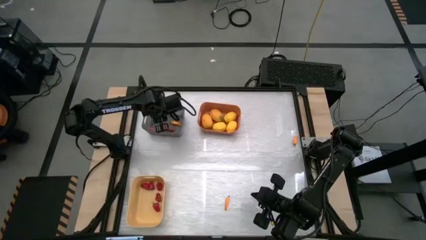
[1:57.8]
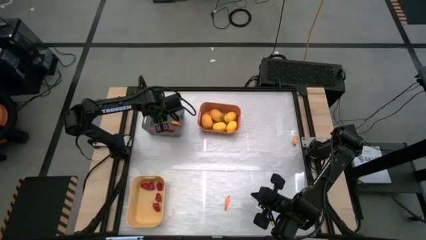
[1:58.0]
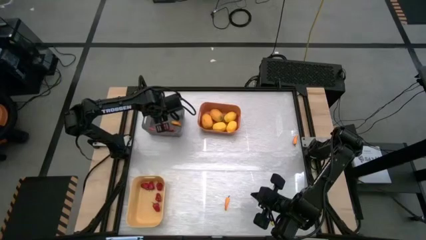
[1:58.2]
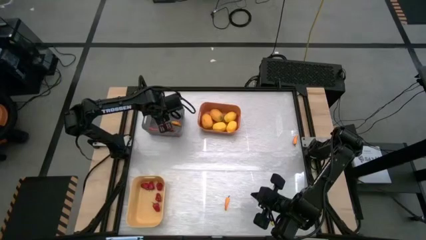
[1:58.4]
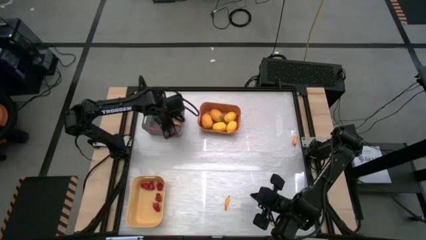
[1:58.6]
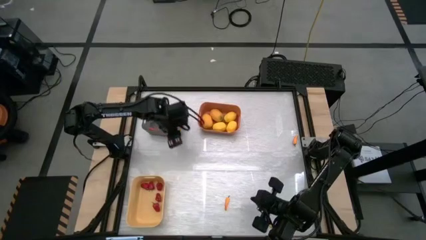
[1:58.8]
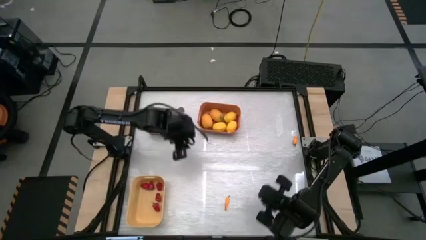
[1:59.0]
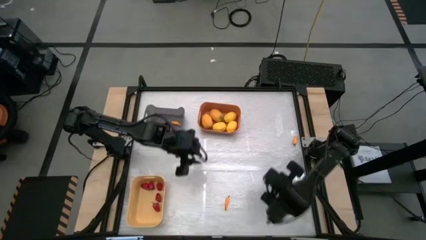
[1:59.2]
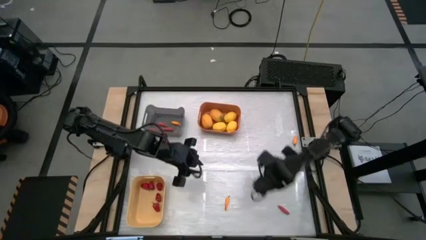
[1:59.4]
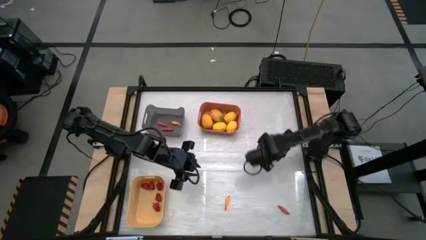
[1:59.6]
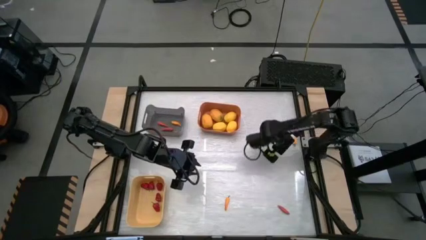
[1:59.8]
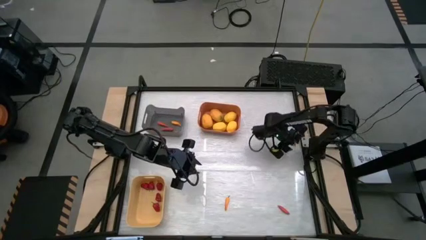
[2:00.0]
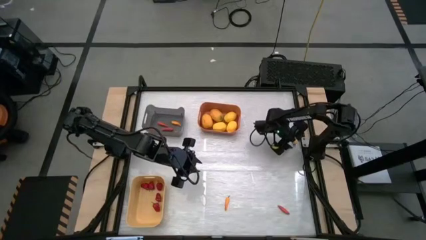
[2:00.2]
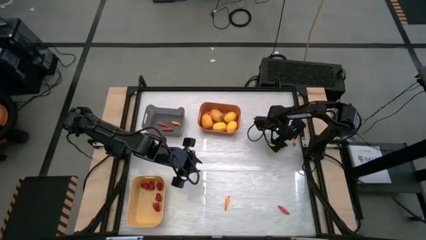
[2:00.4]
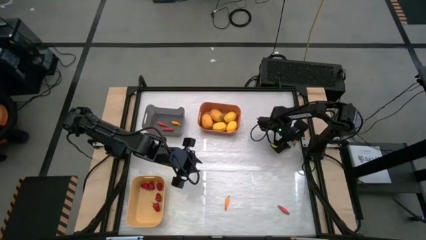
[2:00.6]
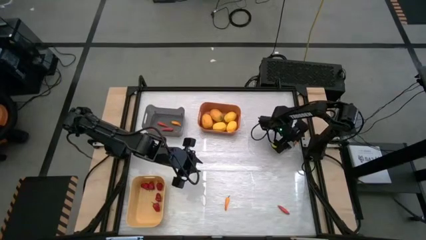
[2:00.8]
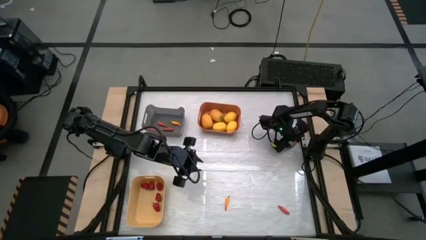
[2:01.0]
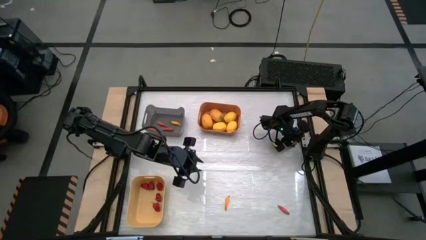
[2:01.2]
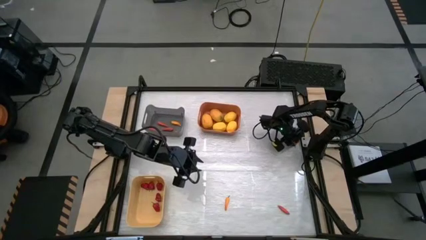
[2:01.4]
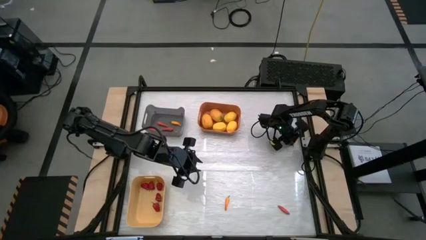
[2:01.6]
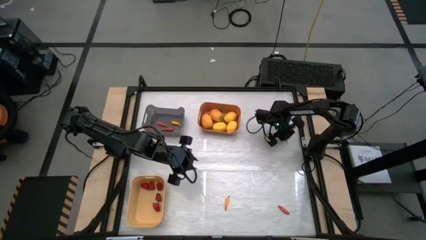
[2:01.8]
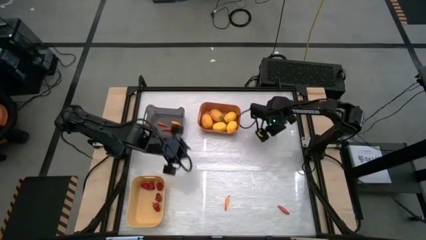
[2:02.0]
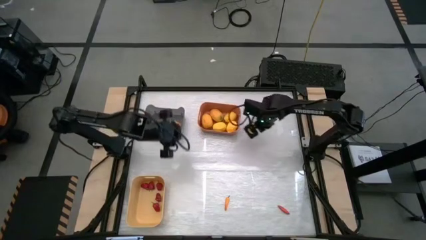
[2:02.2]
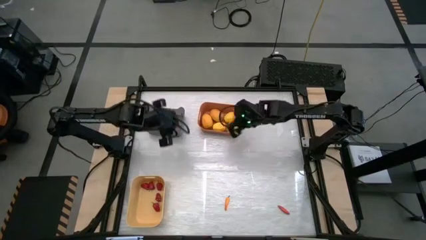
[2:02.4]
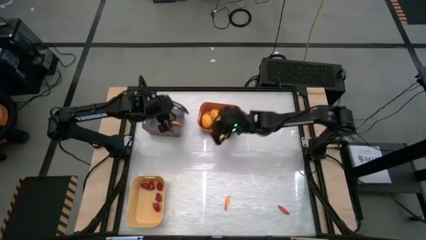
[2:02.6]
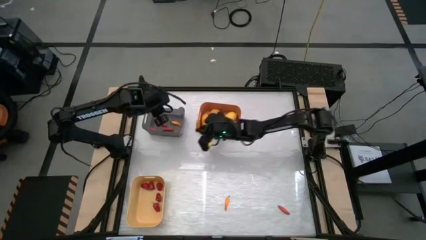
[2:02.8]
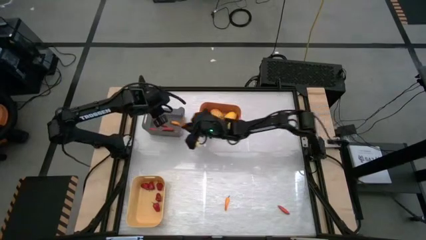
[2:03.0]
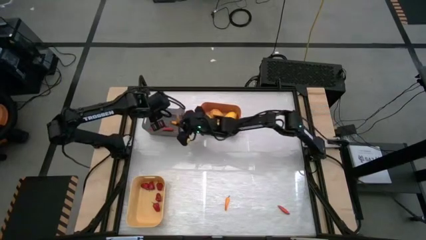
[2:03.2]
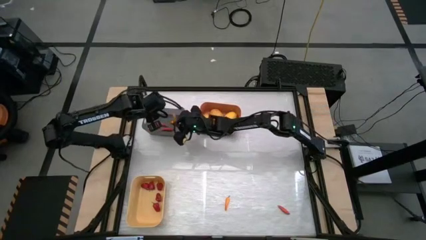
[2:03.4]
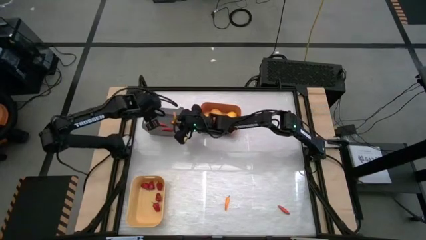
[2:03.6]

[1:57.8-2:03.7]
Task: Sort produce into baskets
Put the chili pepper into the black bin

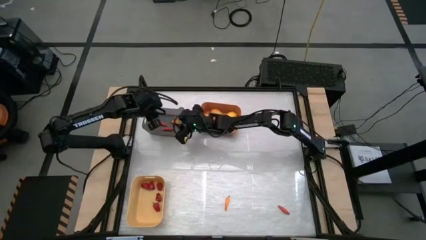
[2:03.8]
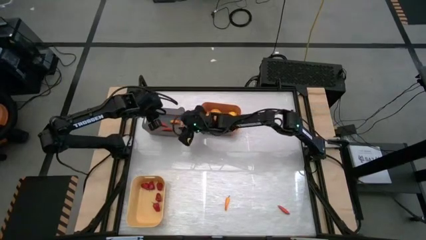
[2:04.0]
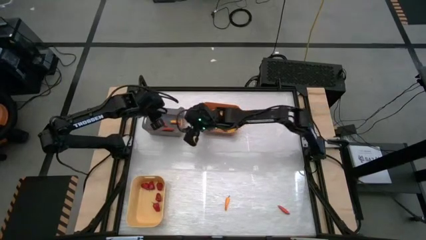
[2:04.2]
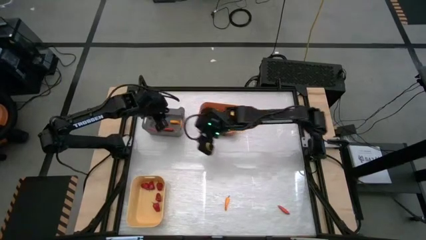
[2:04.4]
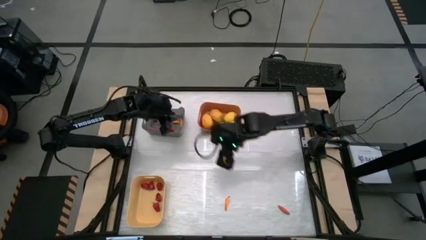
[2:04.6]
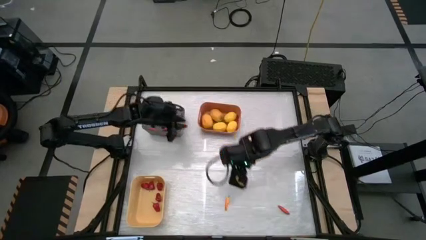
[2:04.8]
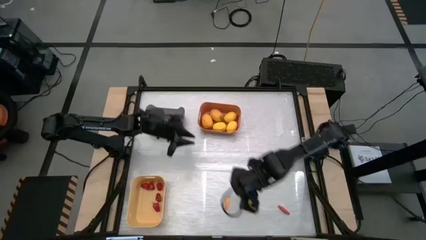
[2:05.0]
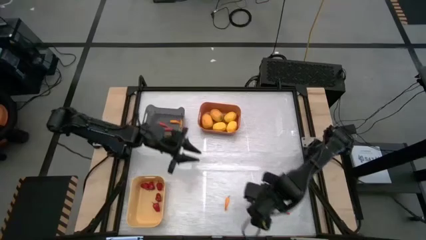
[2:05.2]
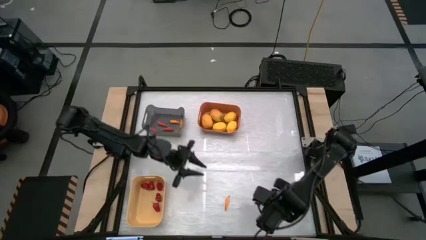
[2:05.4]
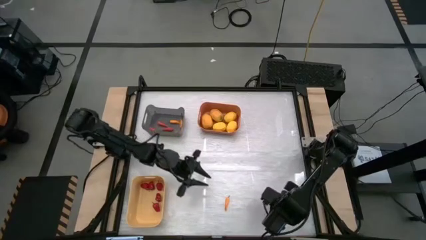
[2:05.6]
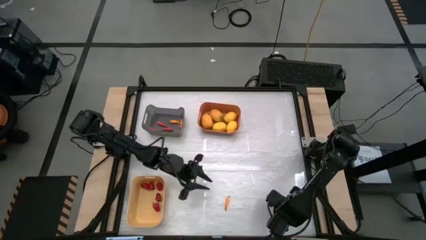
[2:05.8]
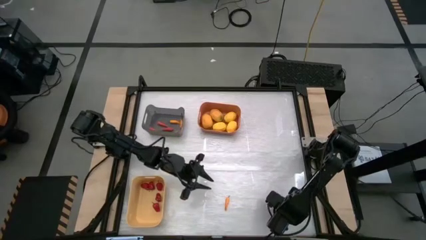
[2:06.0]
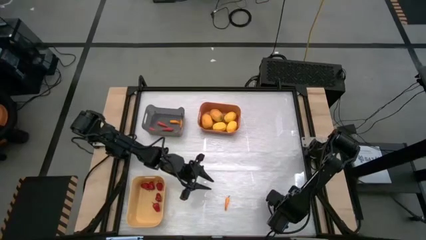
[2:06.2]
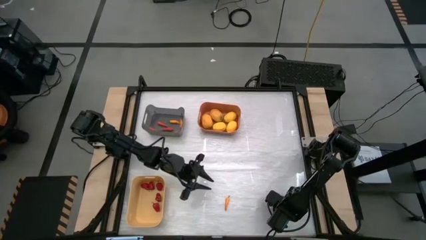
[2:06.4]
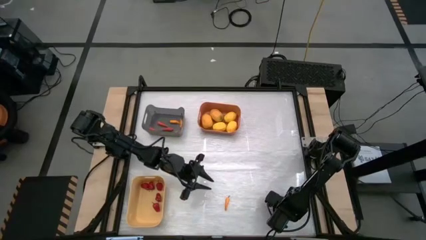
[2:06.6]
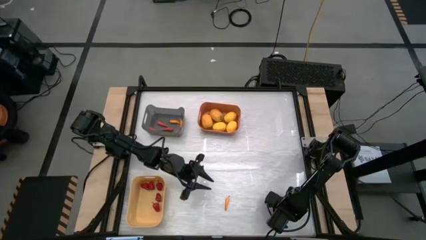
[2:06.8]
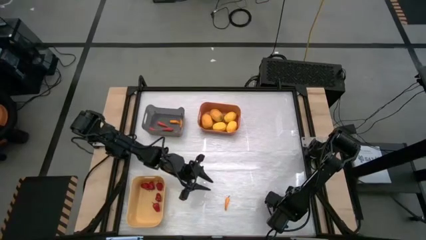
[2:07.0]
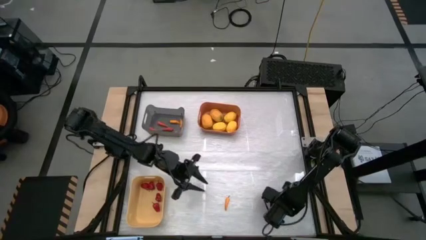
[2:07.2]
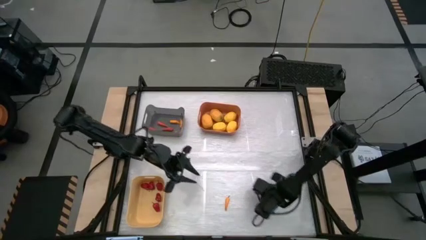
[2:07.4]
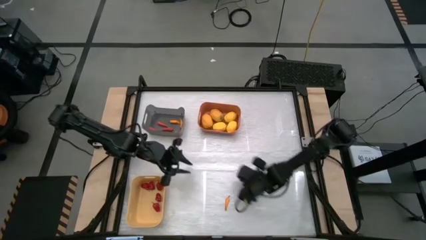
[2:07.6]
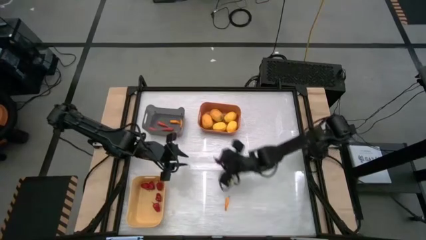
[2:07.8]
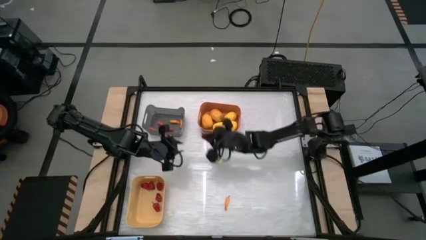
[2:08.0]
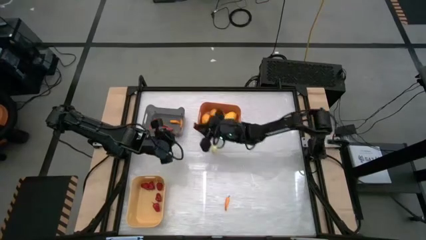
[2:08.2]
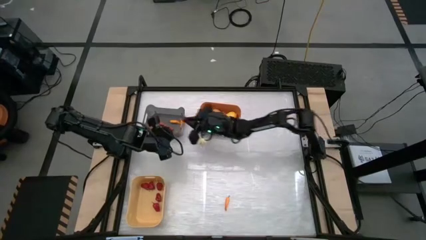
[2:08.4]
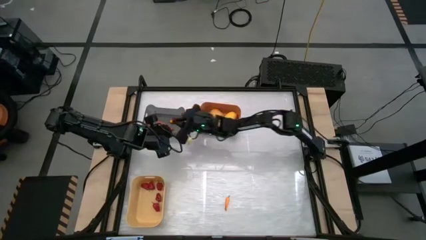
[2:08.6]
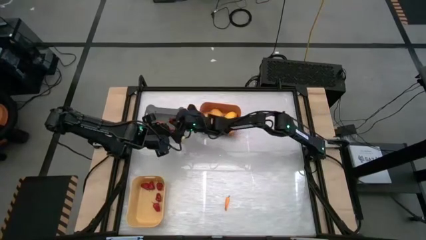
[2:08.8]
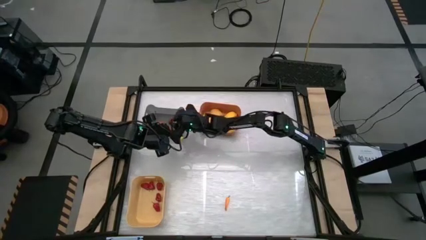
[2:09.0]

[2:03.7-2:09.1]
Put the orange chili pepper into the black bin

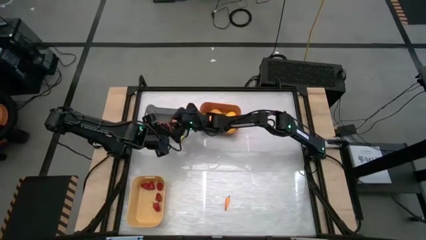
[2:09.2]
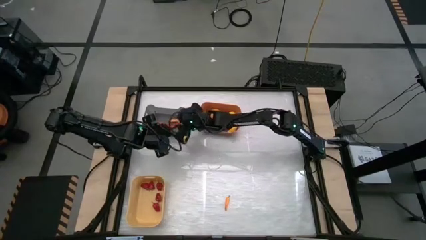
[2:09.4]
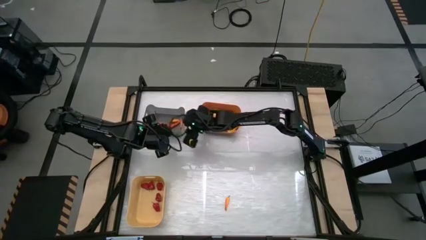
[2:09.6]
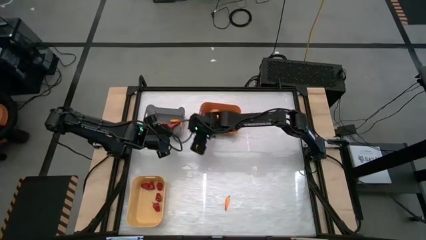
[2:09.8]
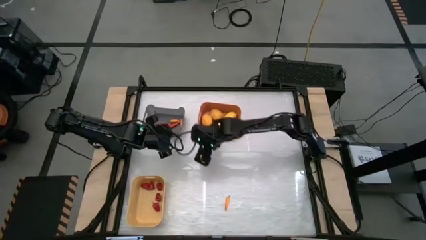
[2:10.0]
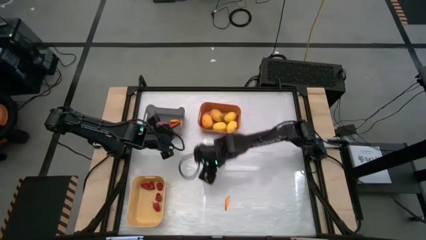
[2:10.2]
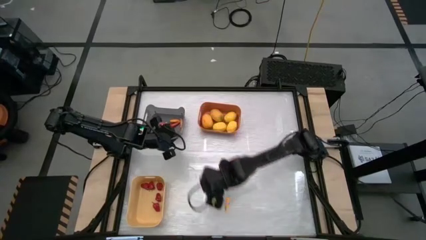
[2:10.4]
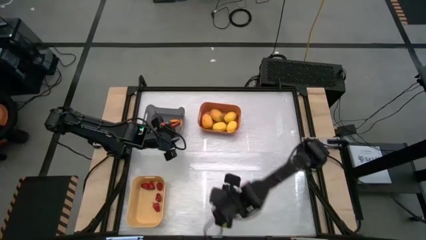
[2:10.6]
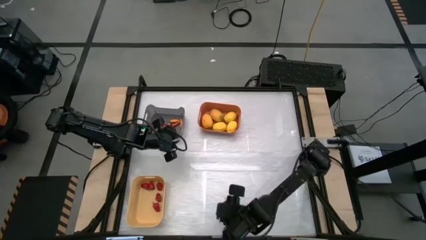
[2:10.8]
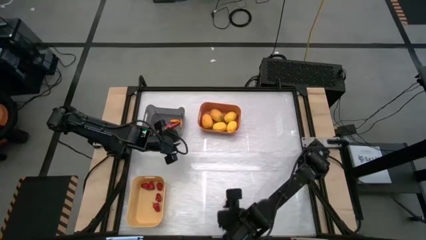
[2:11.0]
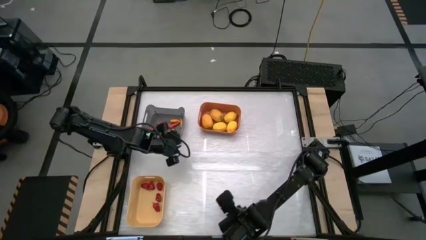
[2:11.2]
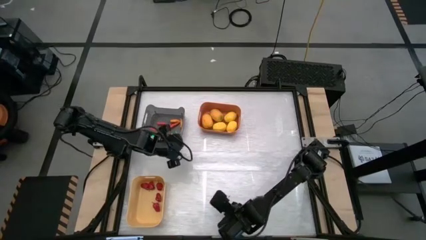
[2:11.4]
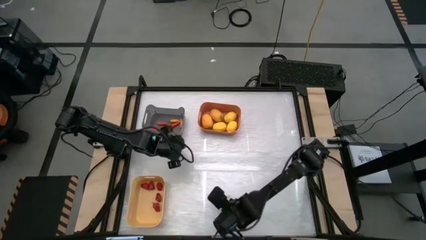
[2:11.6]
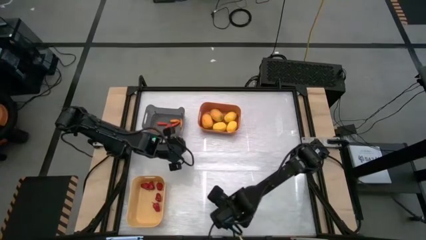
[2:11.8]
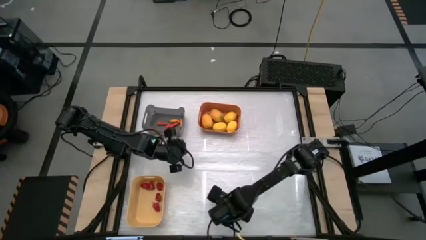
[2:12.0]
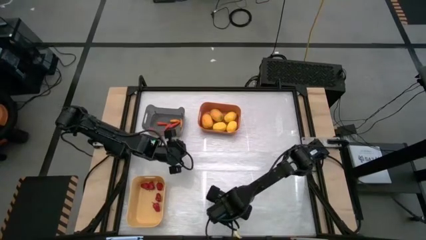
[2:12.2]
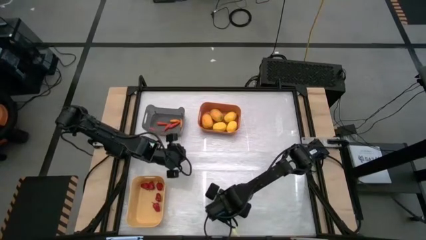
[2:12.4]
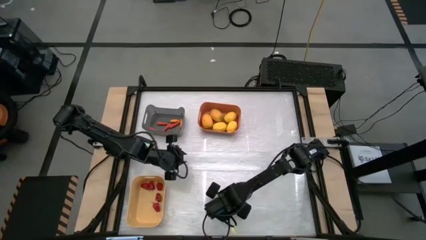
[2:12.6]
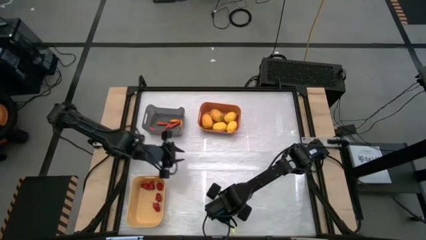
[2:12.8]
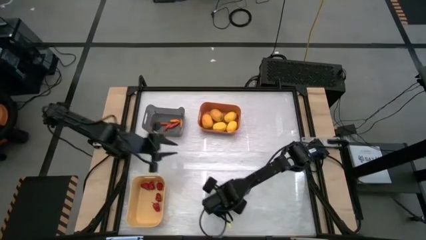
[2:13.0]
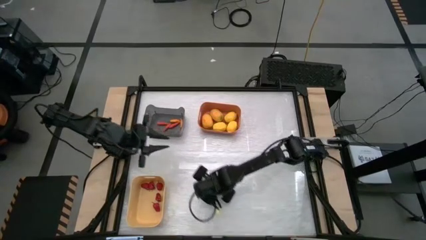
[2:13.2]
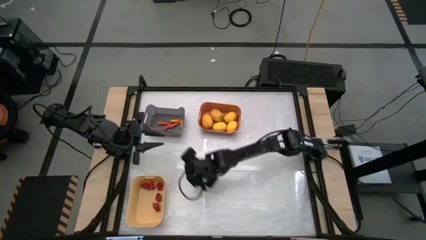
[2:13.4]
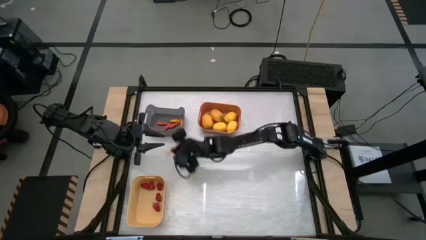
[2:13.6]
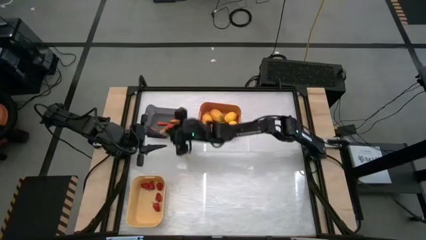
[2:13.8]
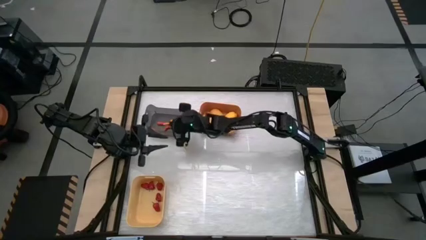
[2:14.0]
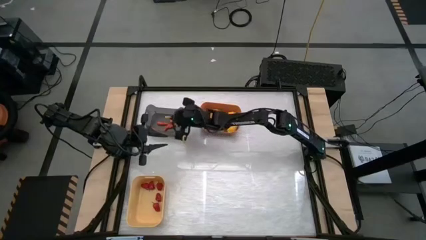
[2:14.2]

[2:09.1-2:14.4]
Put the yellow chili pepper into the black bin
